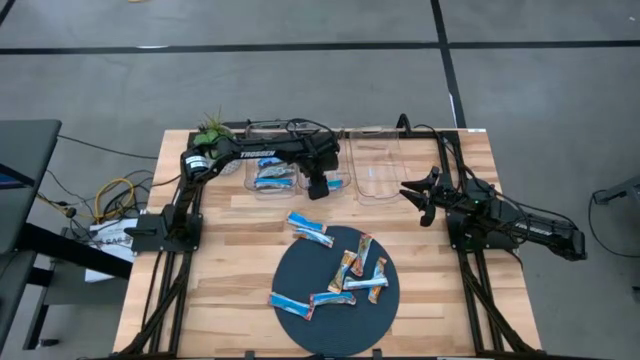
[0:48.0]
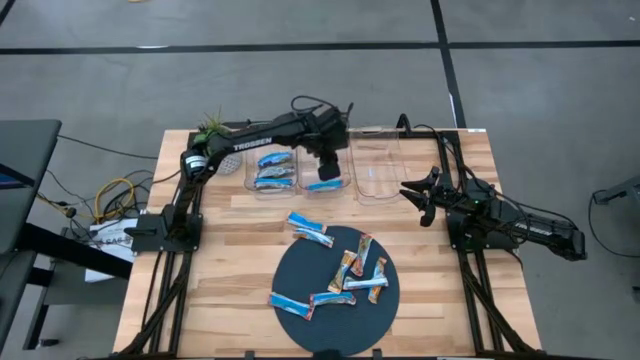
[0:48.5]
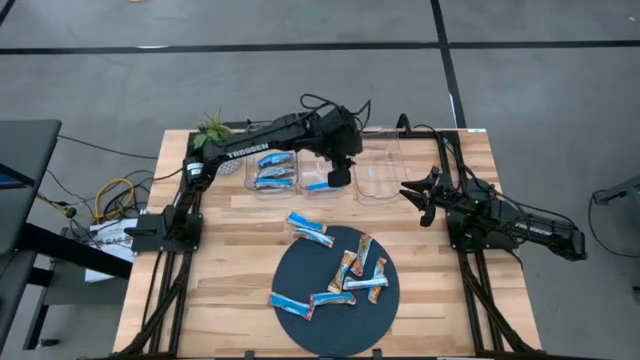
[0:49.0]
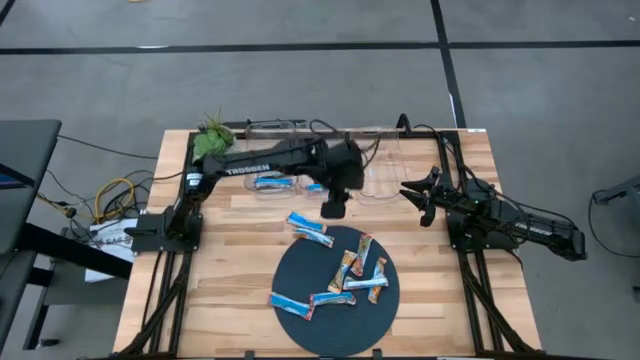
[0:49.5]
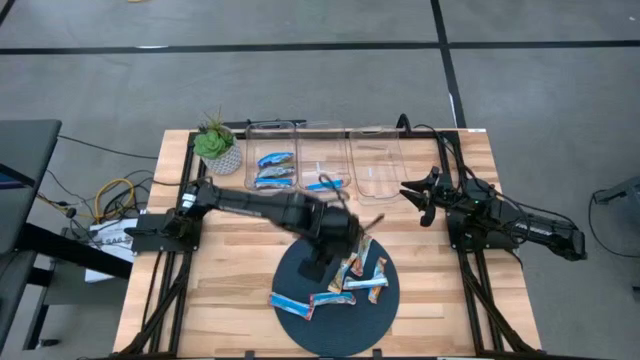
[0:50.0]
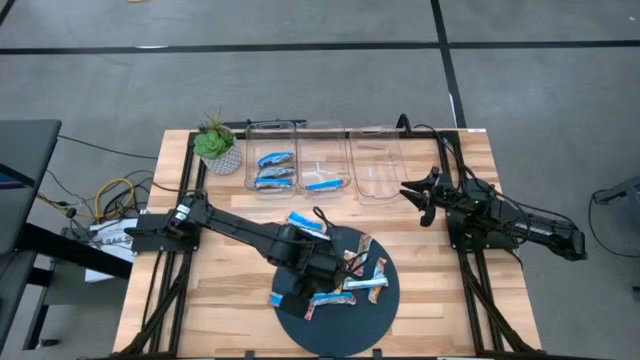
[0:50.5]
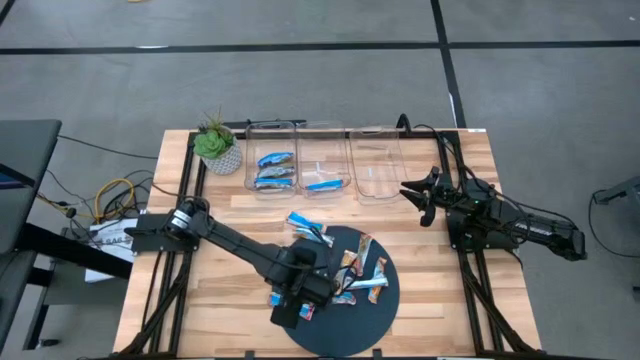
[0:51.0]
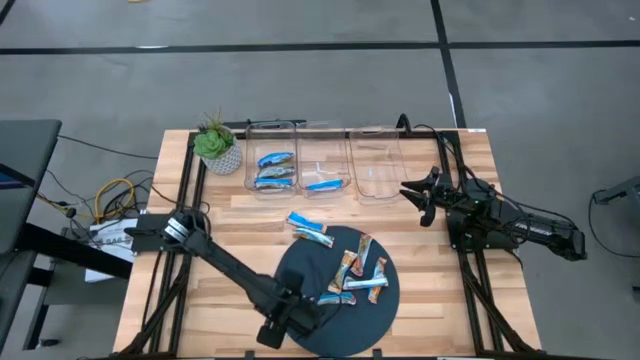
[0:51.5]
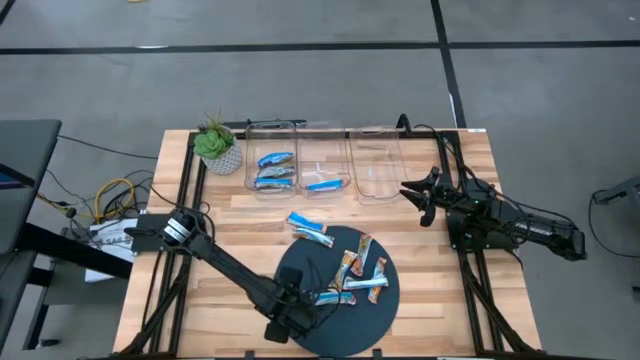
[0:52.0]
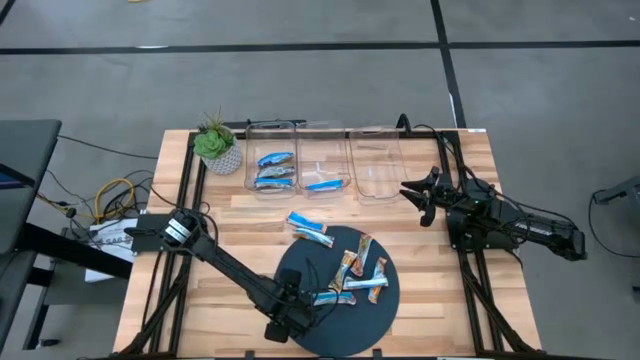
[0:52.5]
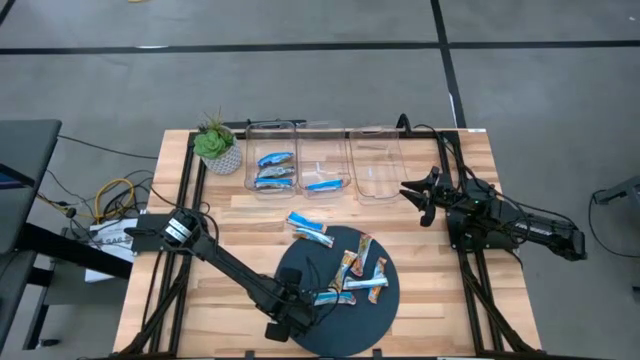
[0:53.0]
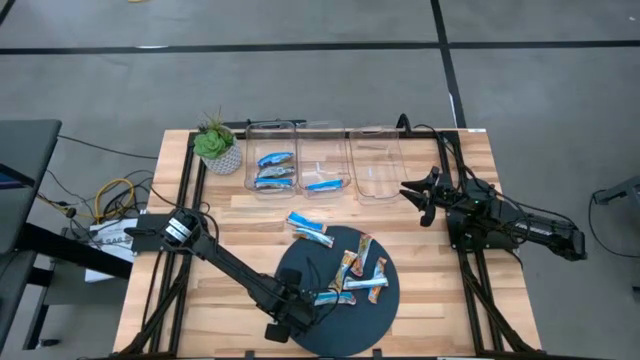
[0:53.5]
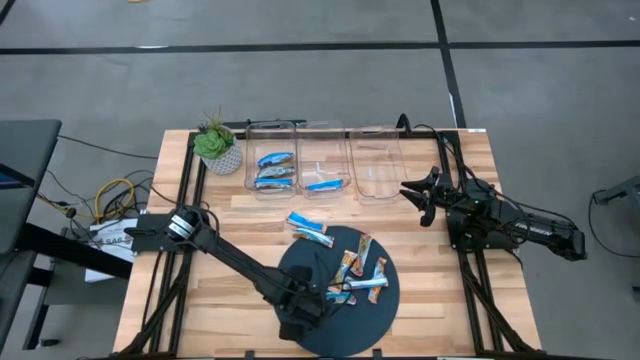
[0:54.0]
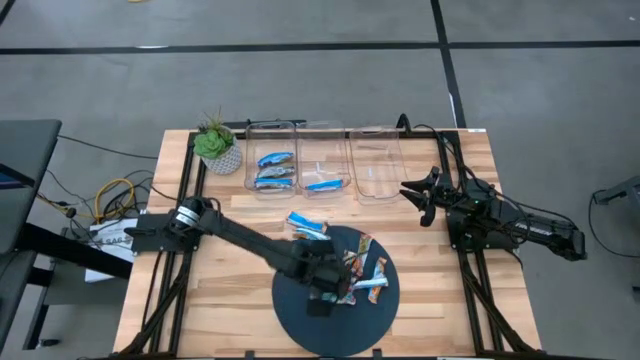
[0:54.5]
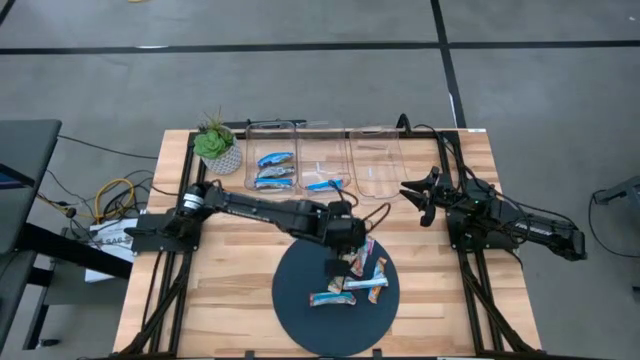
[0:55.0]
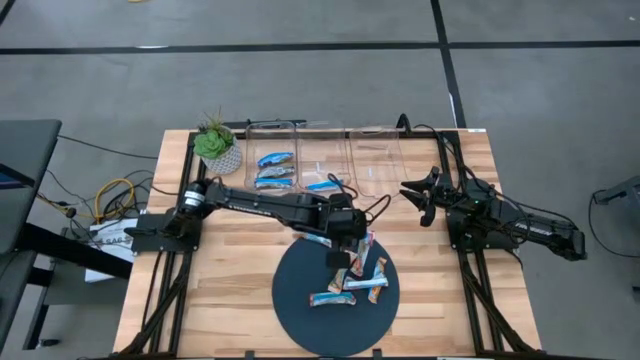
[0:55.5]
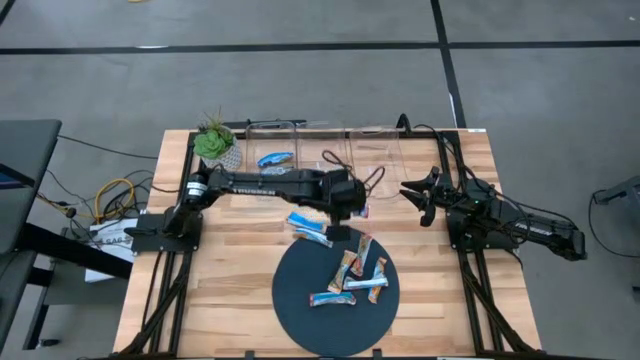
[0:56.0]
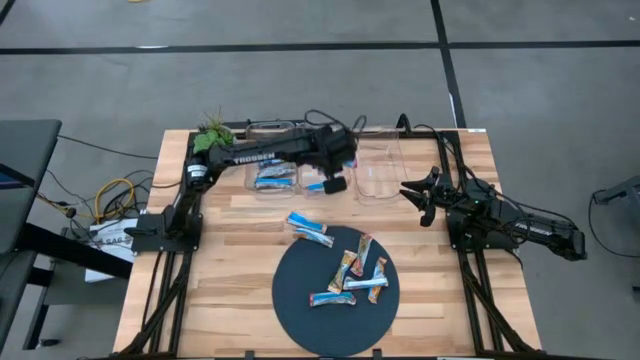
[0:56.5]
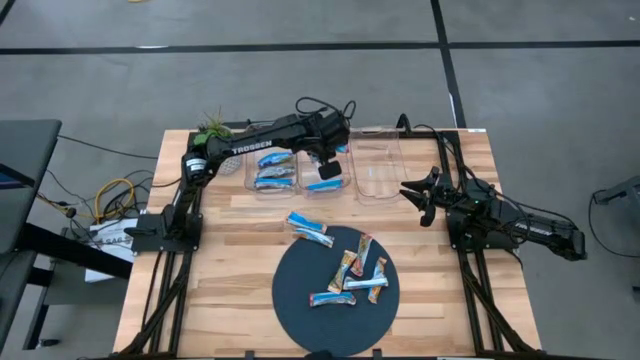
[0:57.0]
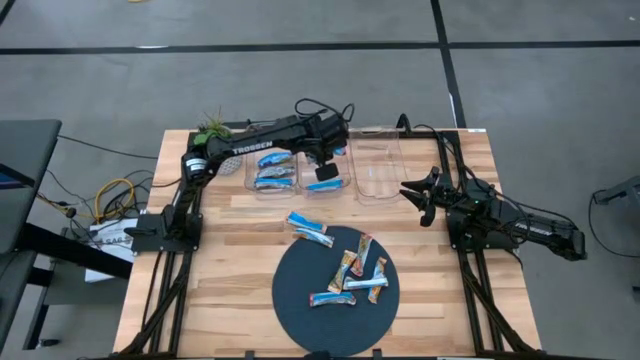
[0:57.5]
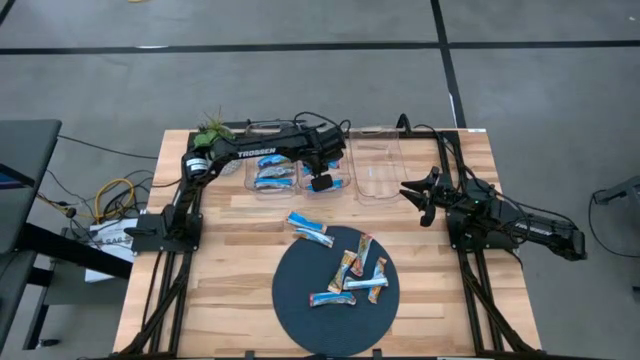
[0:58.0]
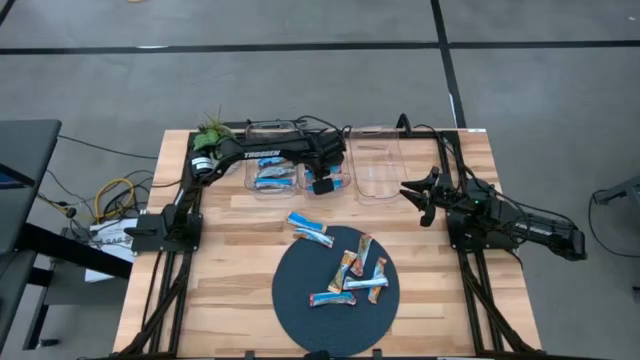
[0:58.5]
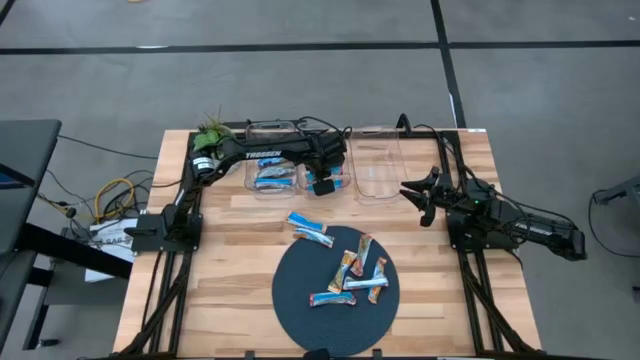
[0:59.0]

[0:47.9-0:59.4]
Task: Pick and place Granola Bars by type
Put the red granola bar into the middle transparent bin

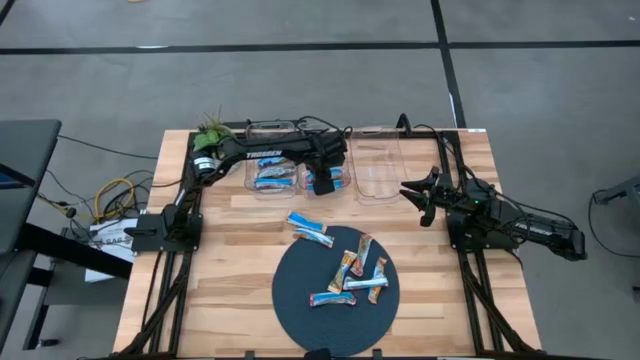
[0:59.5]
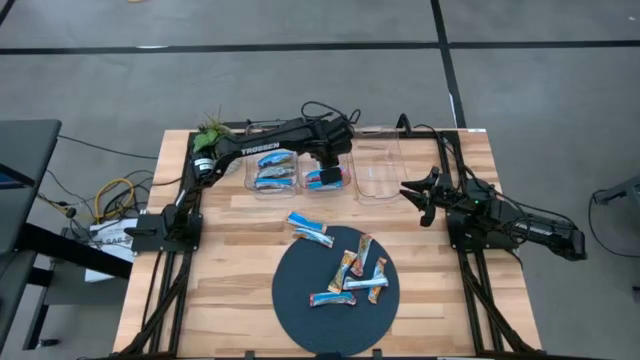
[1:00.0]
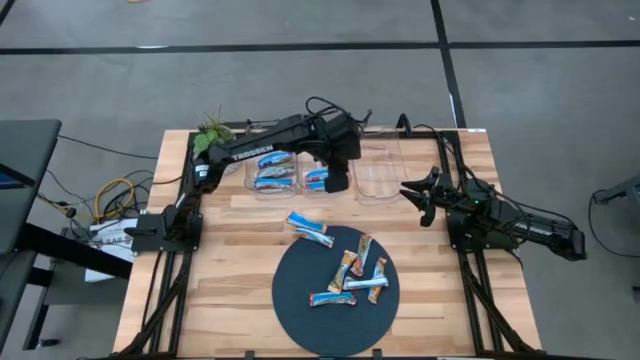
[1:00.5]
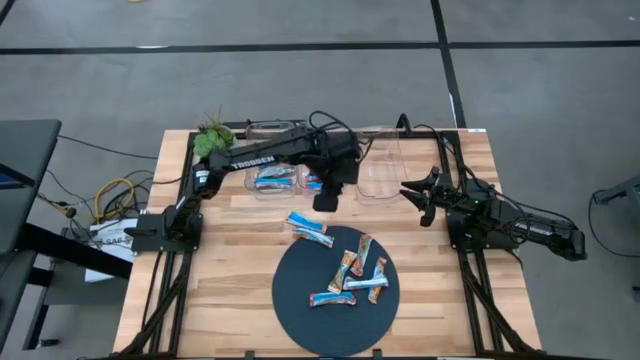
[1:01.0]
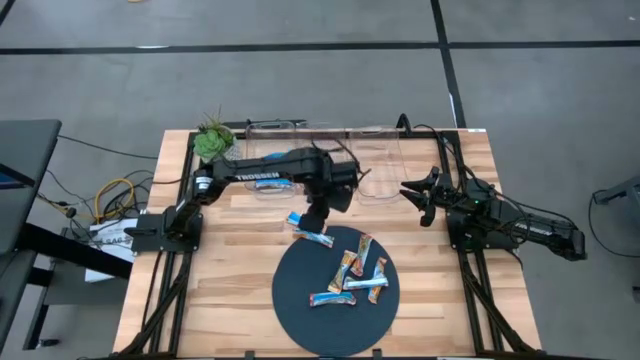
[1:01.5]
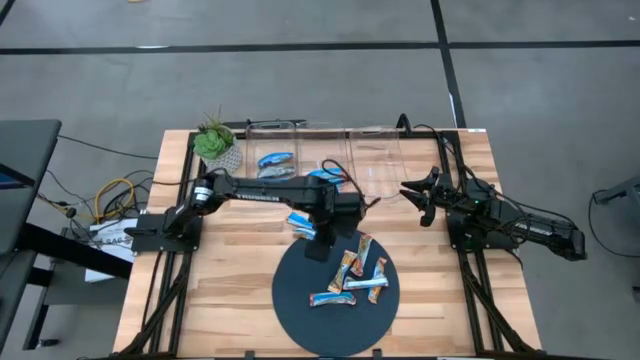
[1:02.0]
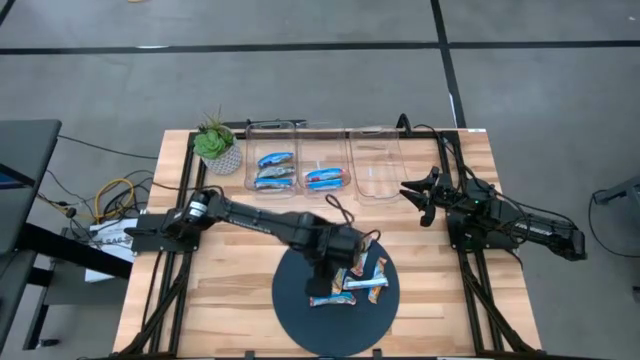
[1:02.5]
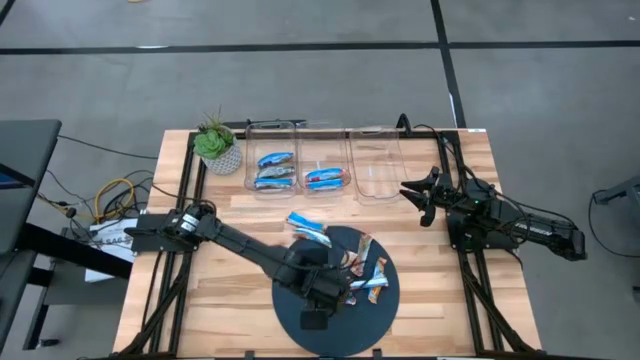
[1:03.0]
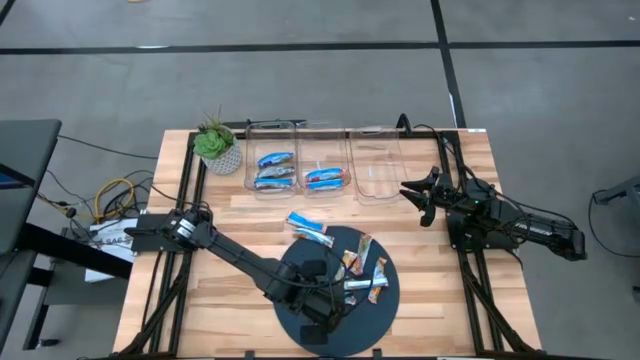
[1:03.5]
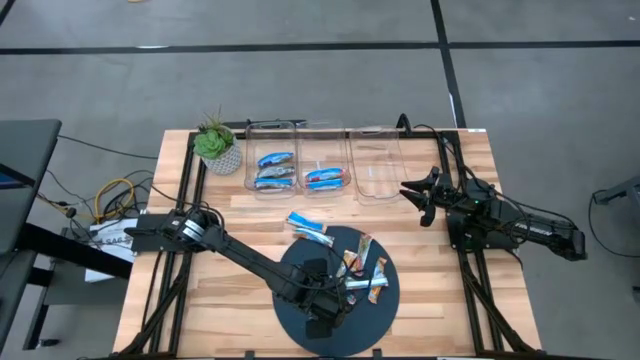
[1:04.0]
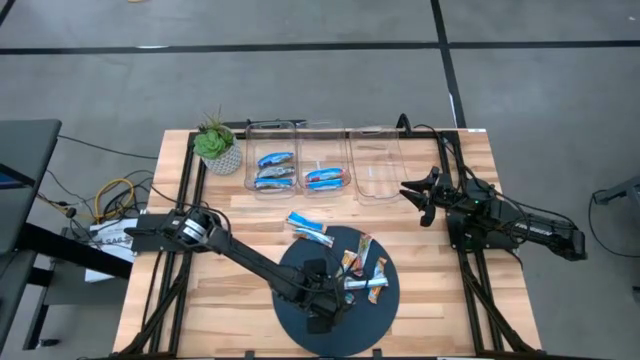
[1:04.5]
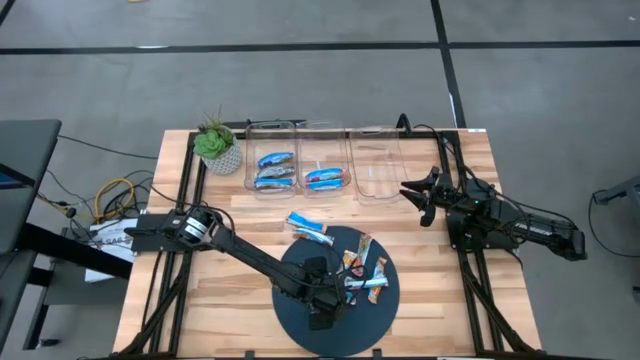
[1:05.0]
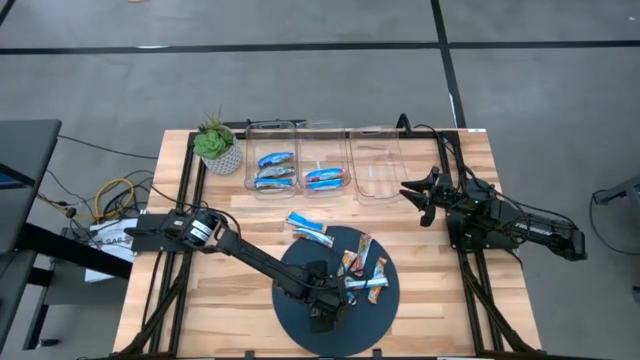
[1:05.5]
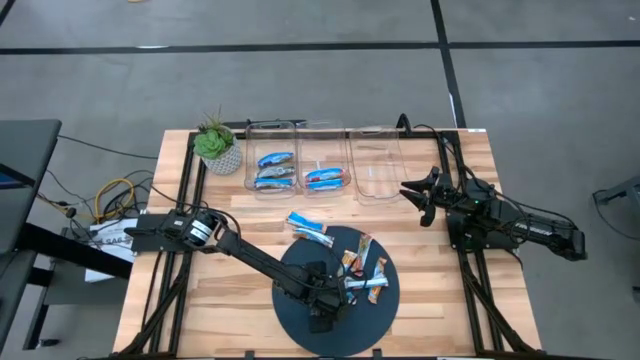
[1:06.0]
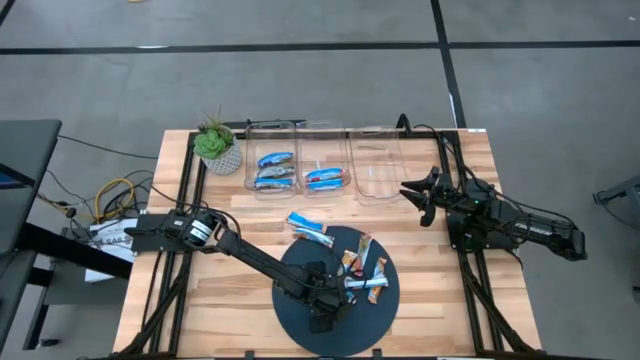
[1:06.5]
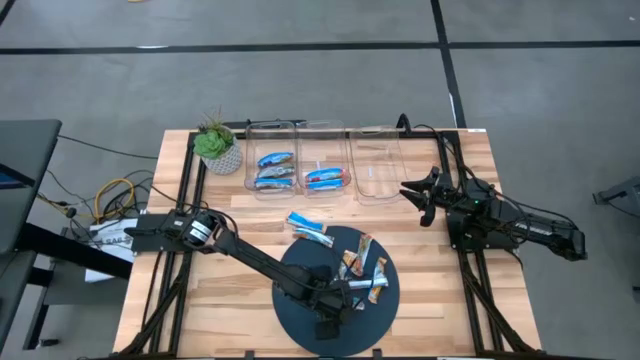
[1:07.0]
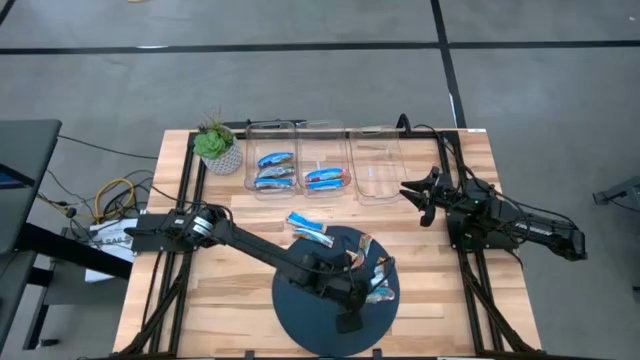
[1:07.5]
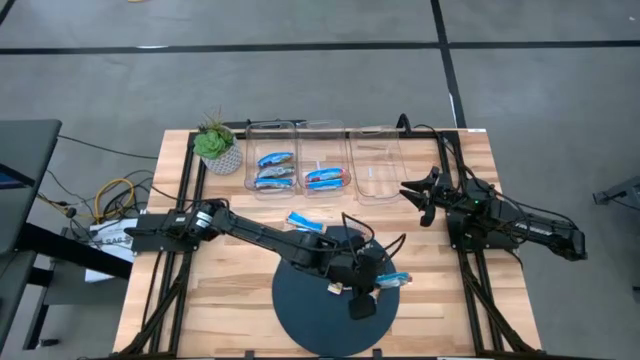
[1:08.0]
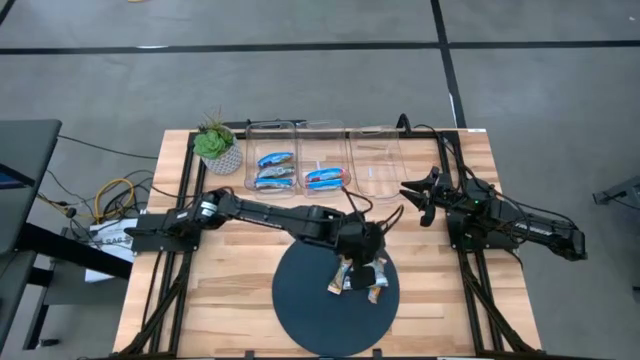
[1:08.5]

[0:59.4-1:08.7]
Put the red granola bar into the middle transparent bin
